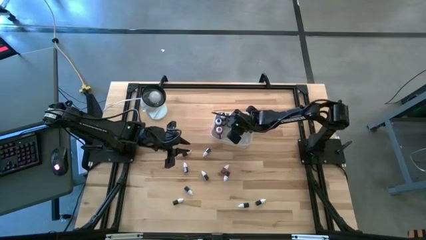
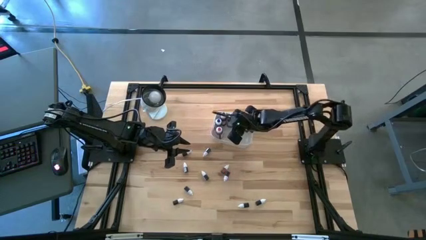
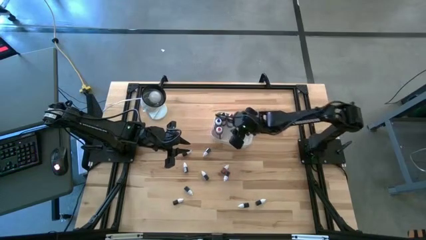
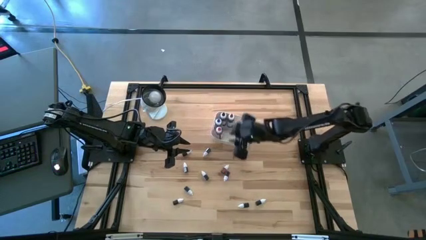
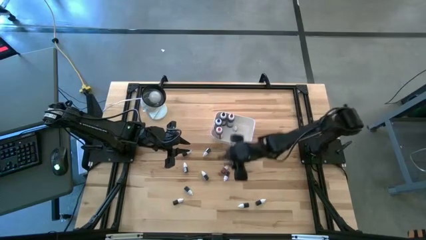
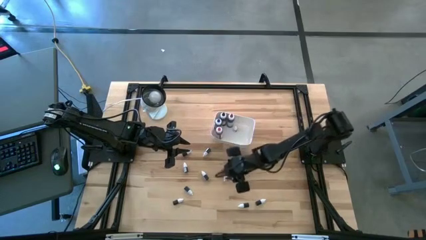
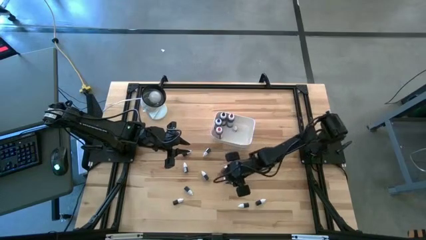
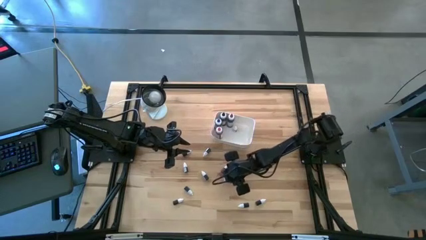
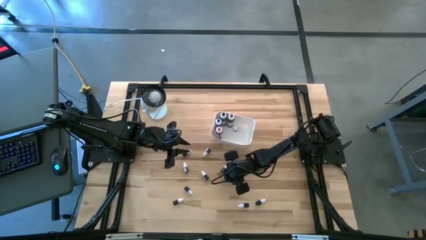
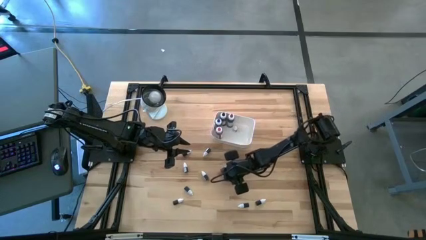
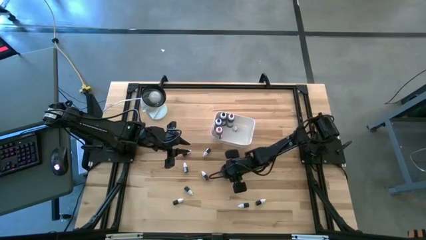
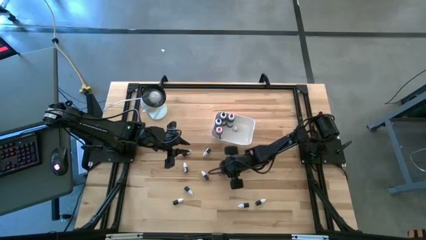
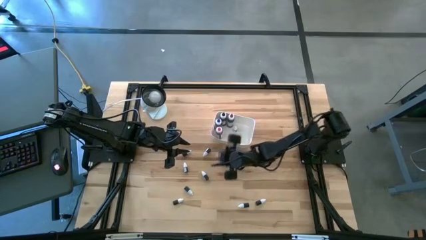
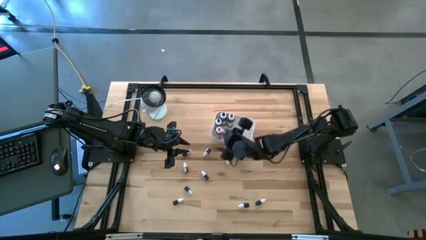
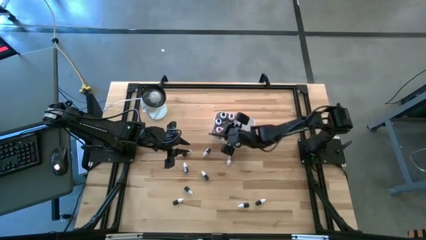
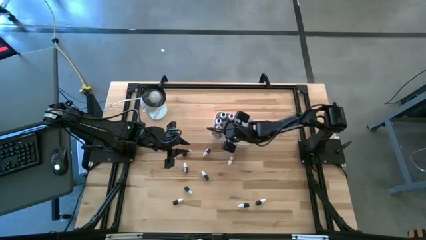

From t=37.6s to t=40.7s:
Task: Pick & Place food coloring
Put the white small food coloring bottle into the white bin

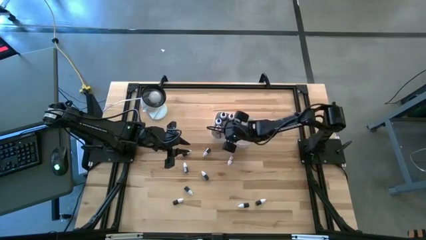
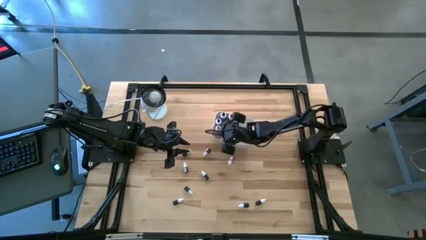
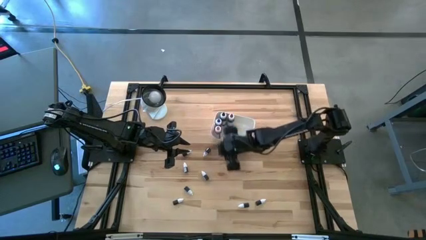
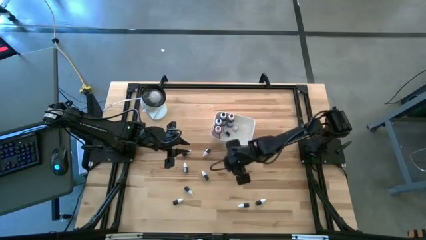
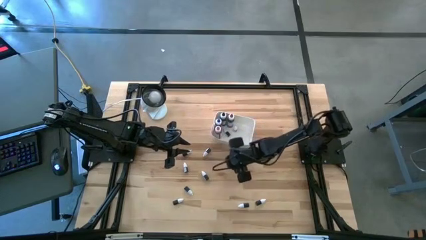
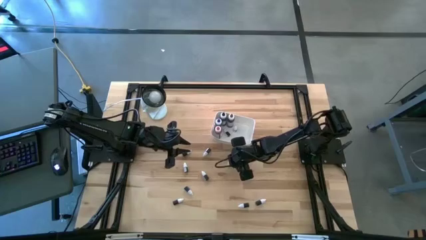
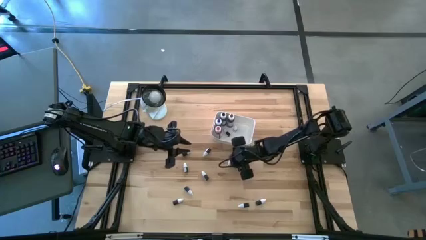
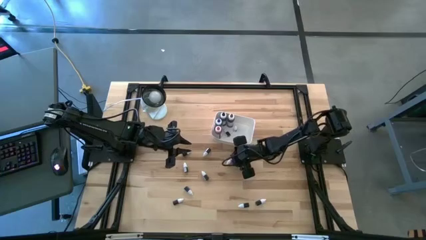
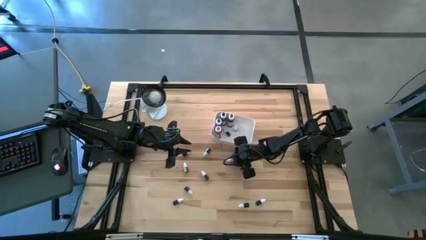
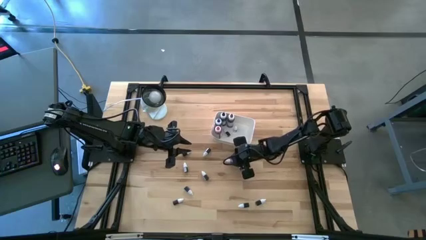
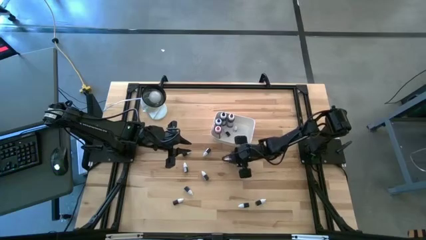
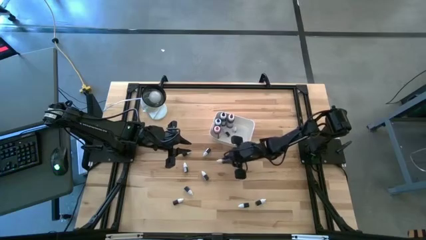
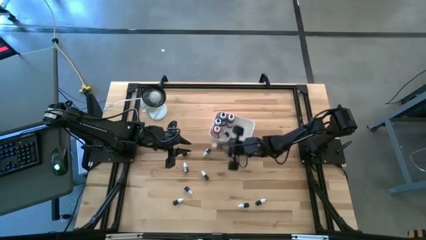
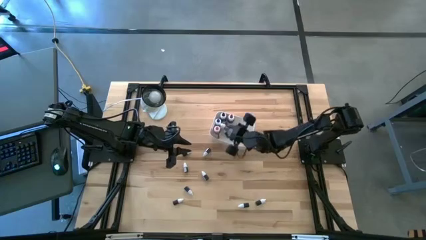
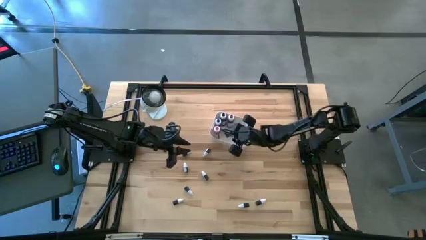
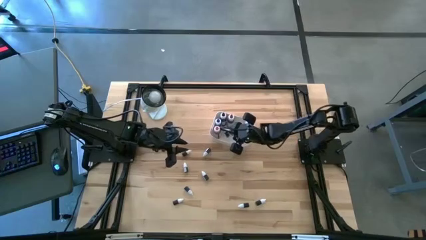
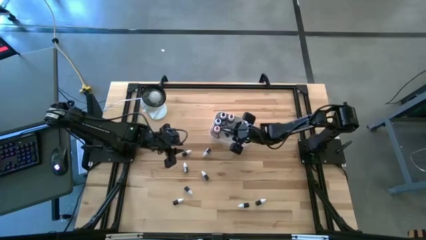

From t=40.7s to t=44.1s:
Put the red small food coloring bottle into the white bin

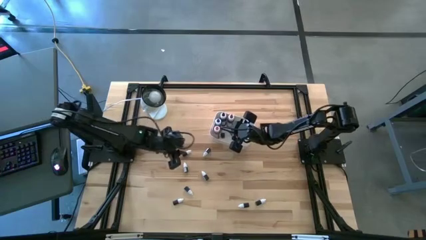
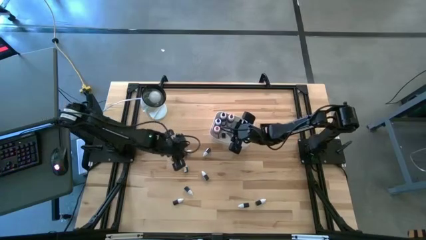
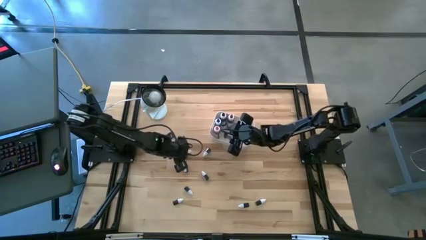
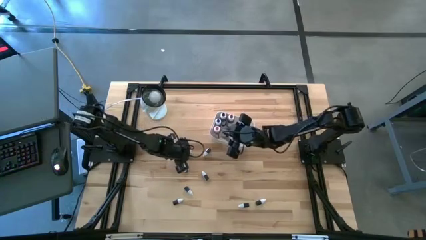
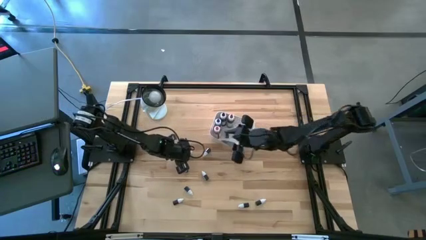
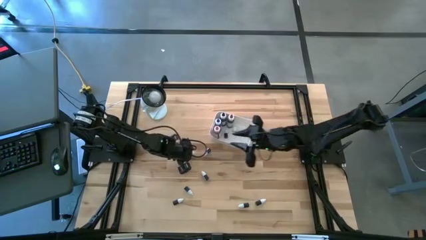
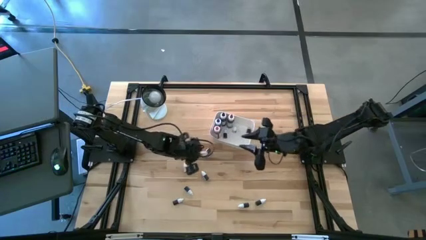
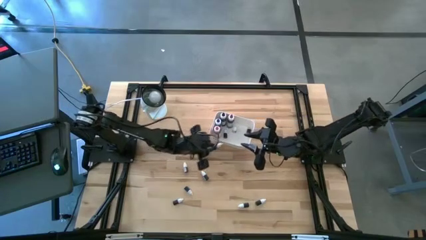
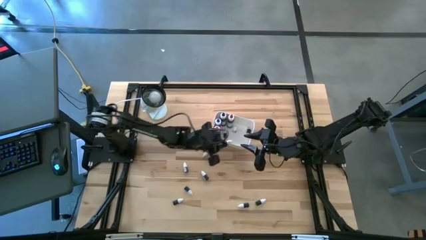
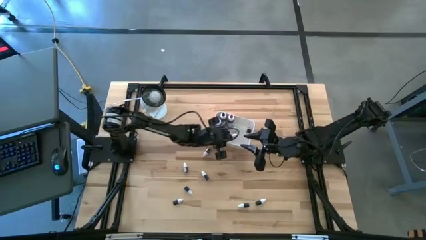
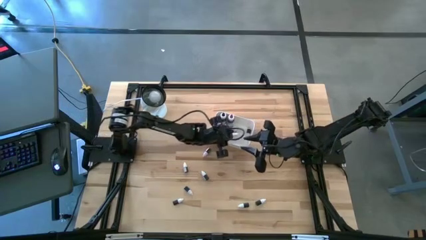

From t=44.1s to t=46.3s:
Put the white small food coloring bottle into the white bin

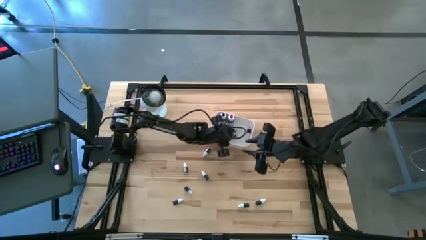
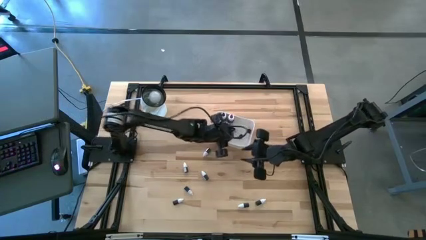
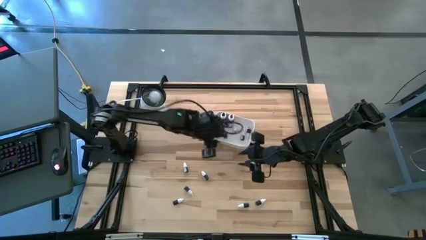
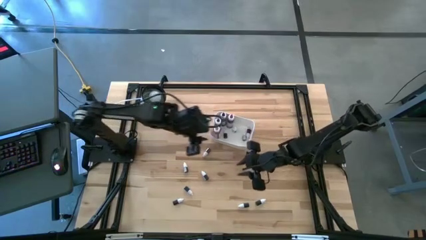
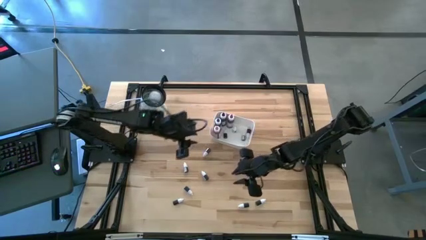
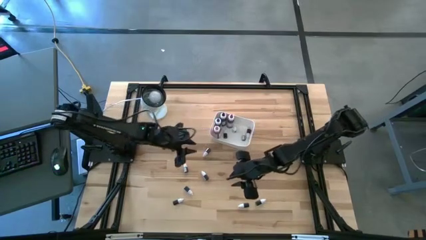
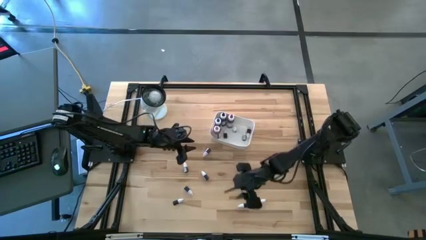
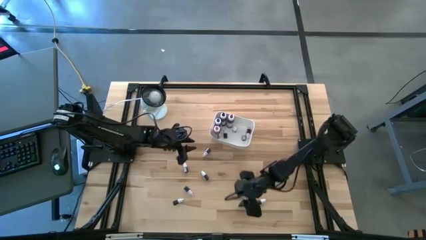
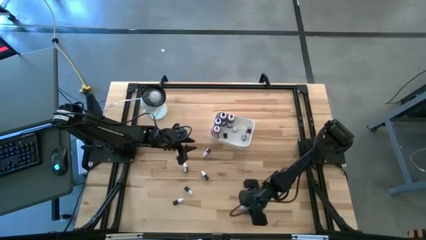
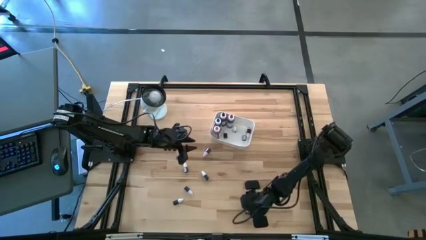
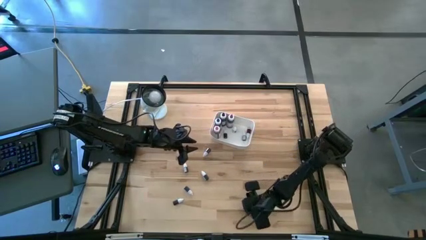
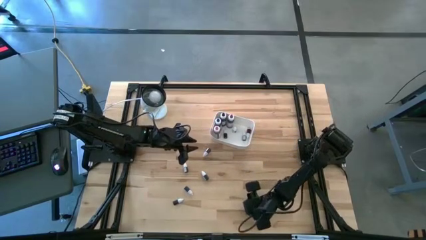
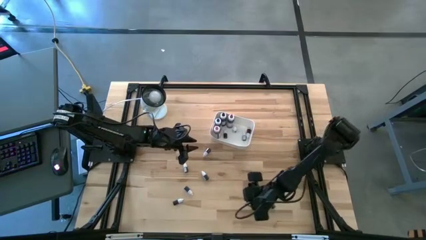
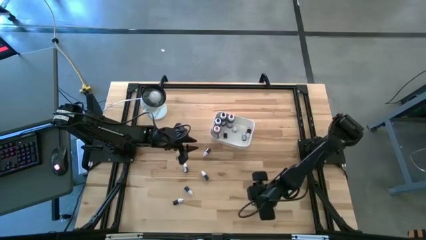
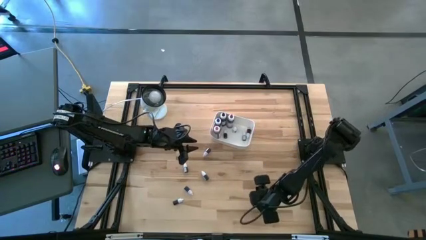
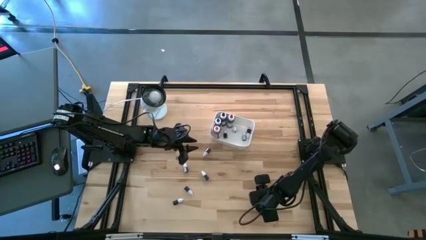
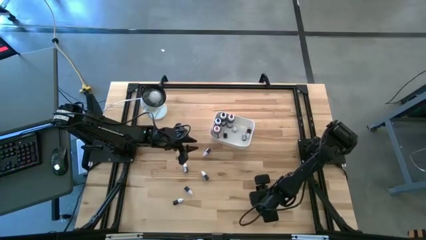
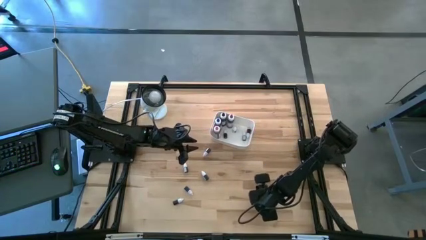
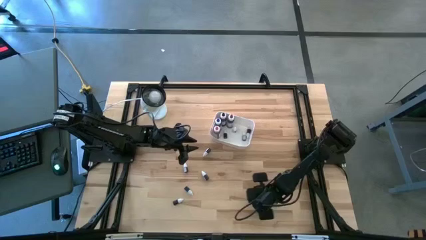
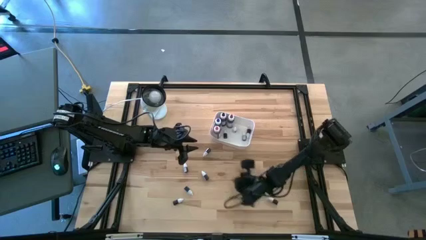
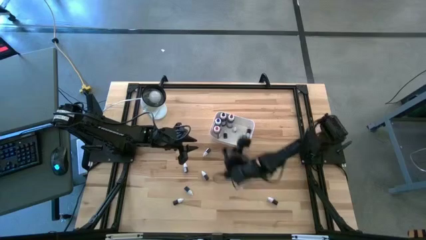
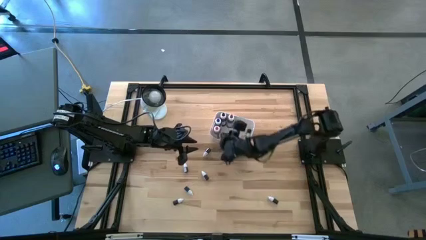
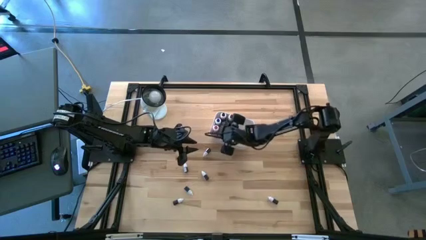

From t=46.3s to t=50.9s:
Put the green small food coloring bottle into the white bin

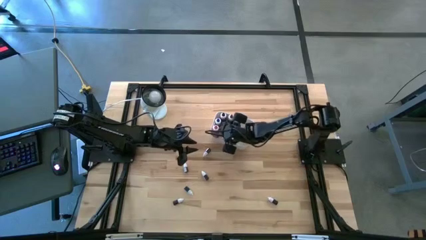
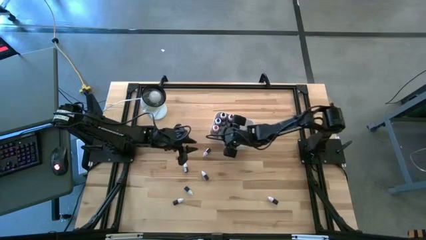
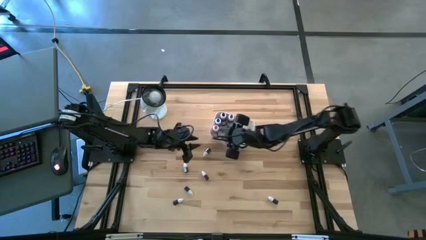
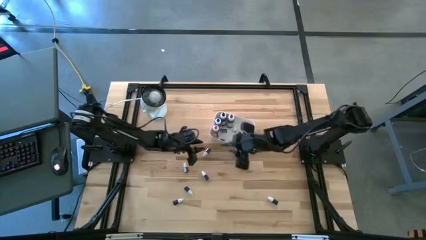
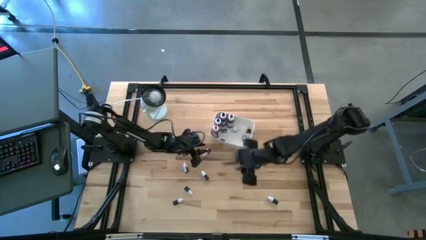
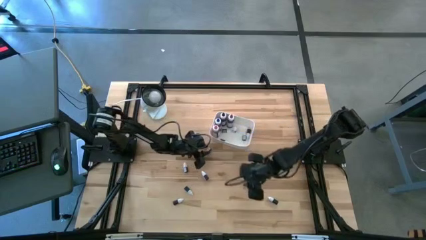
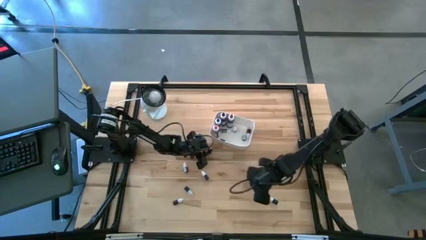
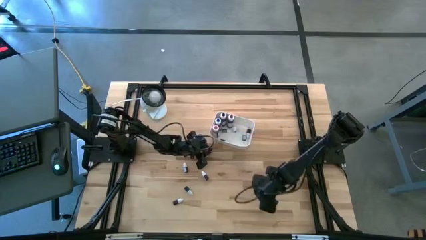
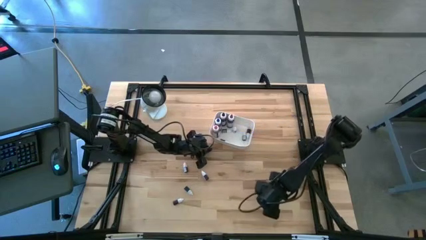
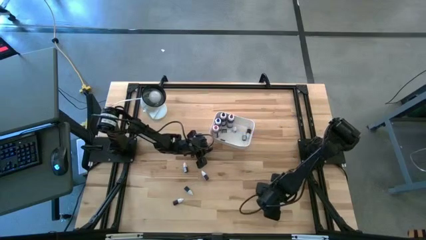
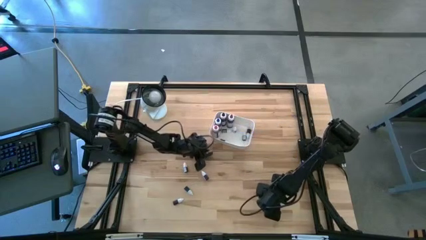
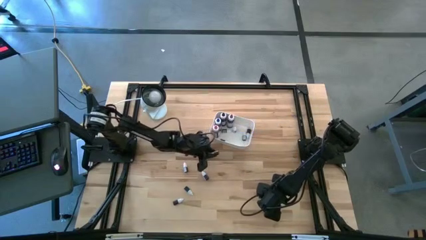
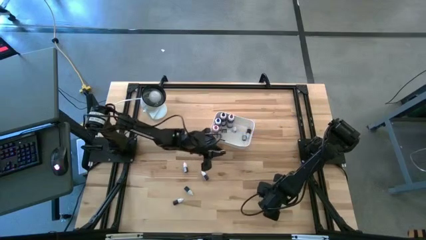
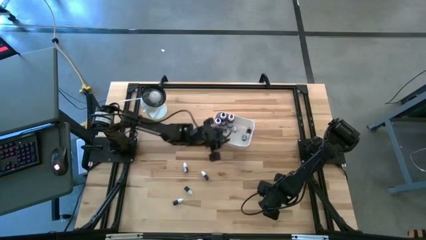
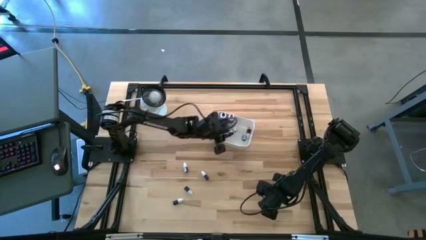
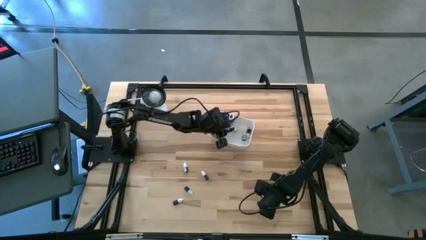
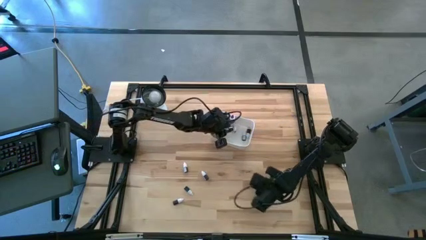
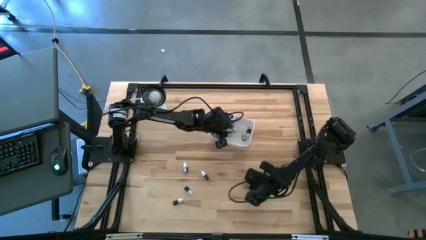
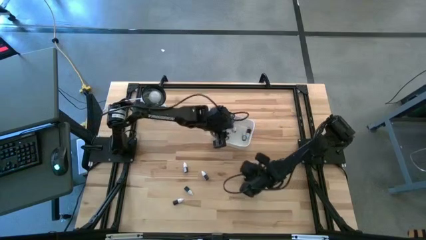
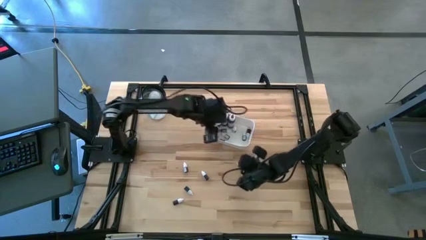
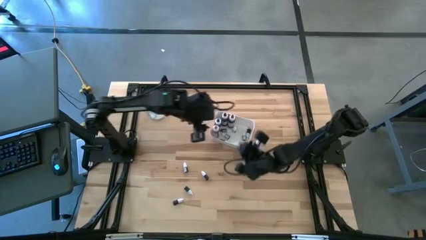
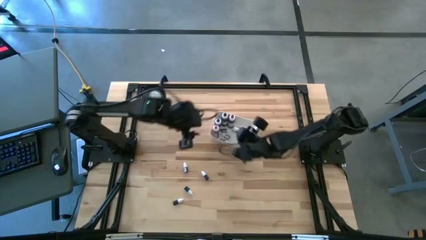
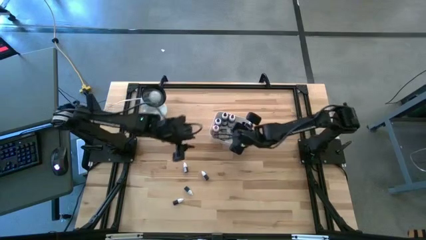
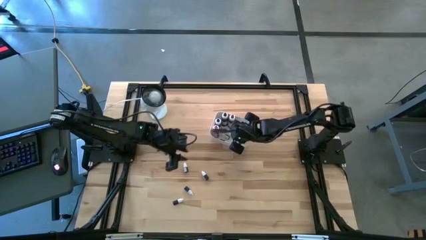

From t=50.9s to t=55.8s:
Put the black small food coloring bottle into the white bin
